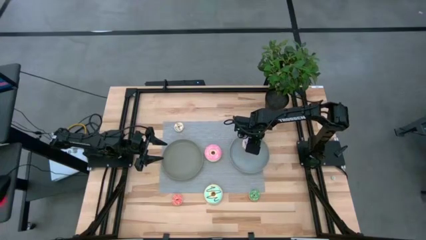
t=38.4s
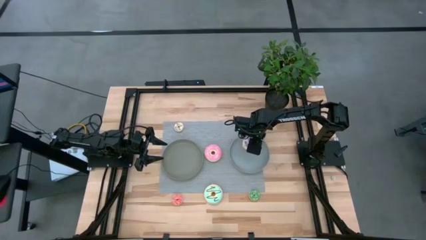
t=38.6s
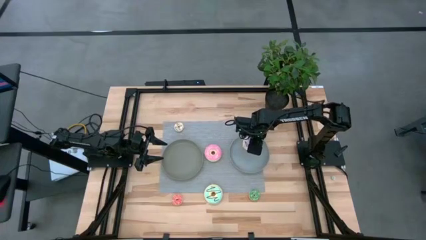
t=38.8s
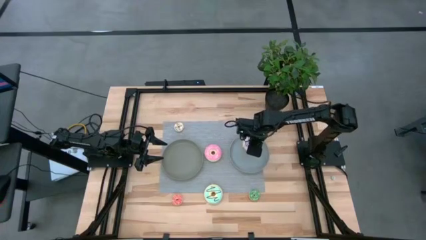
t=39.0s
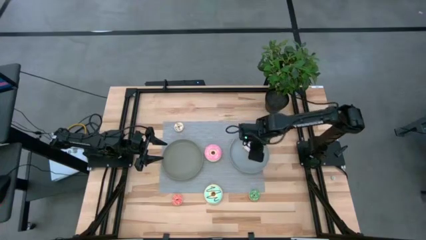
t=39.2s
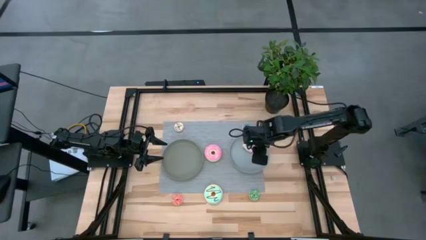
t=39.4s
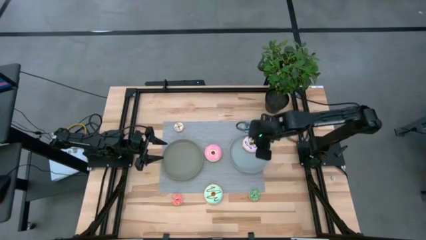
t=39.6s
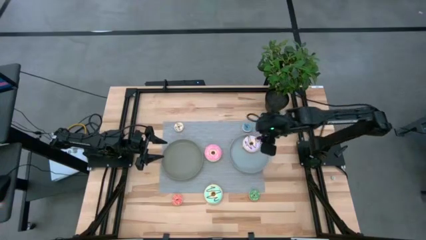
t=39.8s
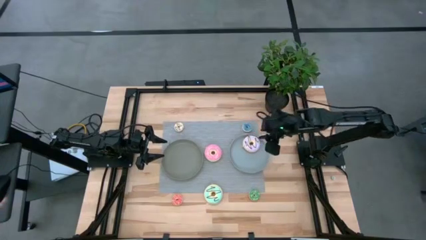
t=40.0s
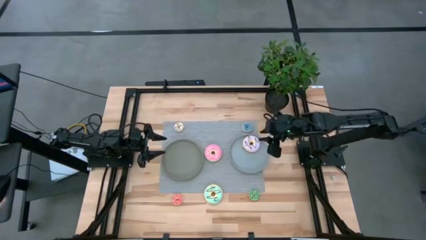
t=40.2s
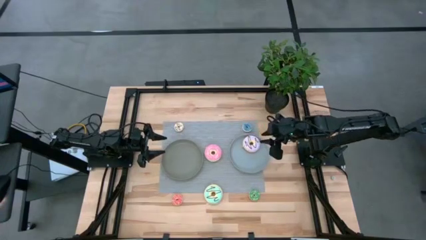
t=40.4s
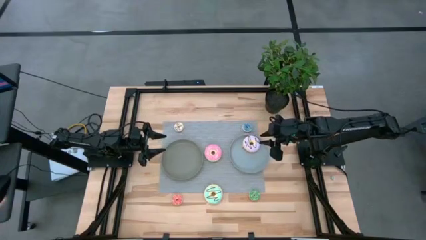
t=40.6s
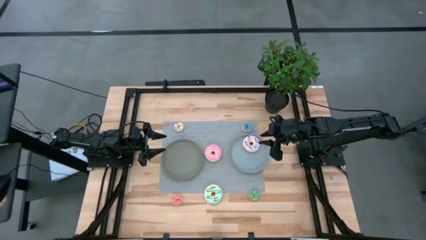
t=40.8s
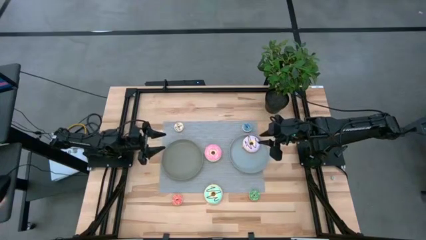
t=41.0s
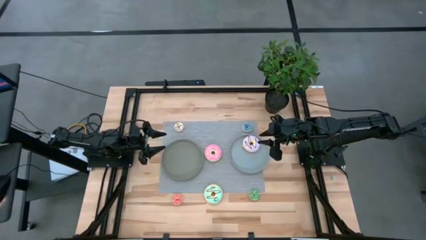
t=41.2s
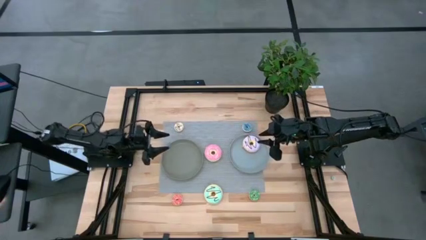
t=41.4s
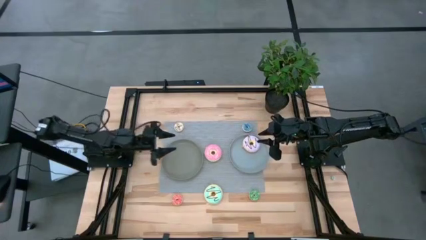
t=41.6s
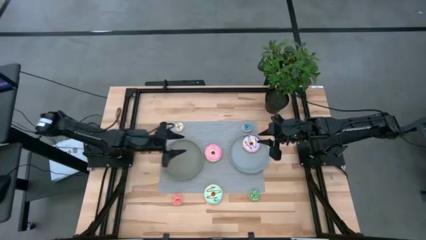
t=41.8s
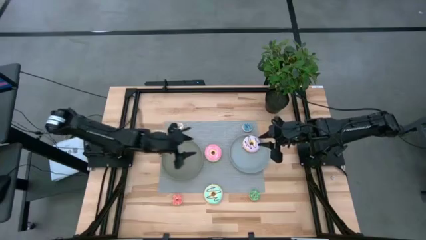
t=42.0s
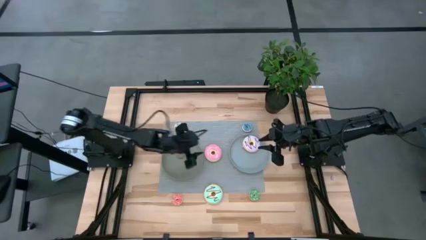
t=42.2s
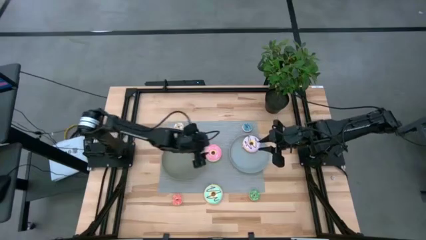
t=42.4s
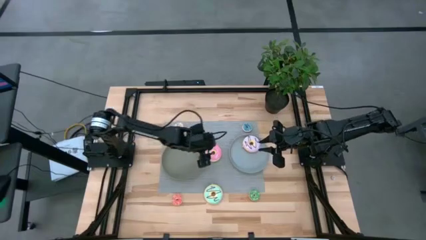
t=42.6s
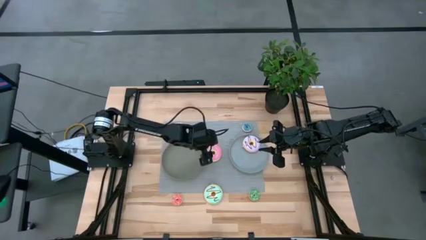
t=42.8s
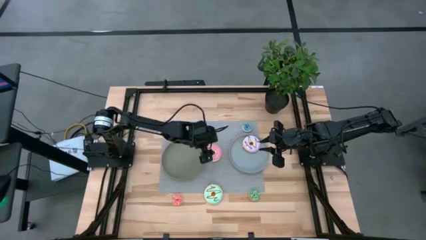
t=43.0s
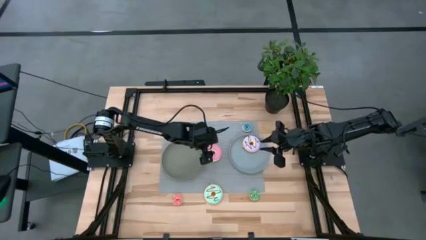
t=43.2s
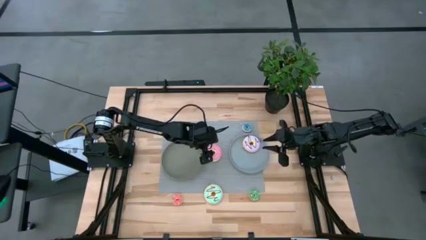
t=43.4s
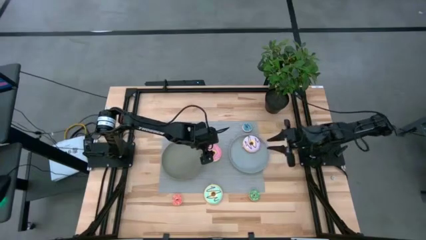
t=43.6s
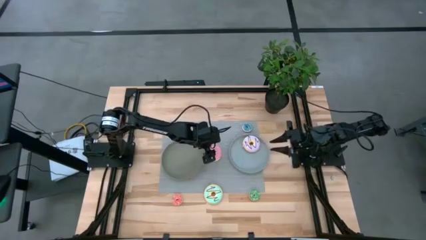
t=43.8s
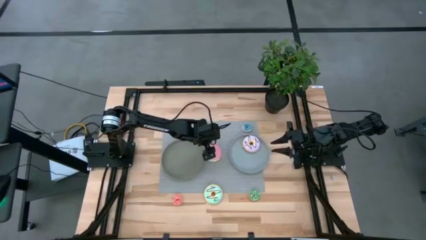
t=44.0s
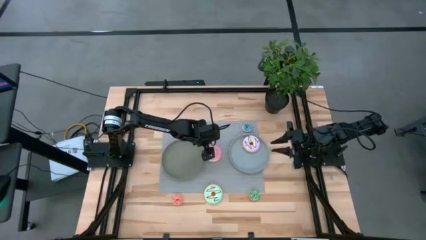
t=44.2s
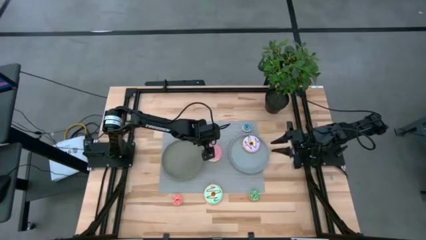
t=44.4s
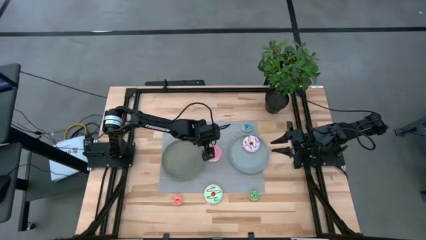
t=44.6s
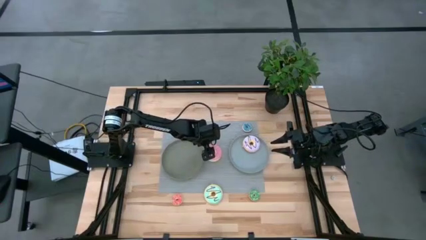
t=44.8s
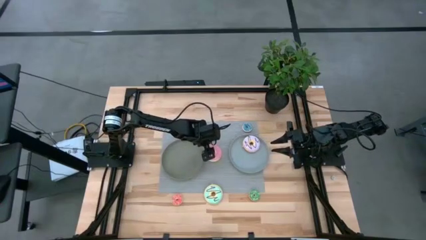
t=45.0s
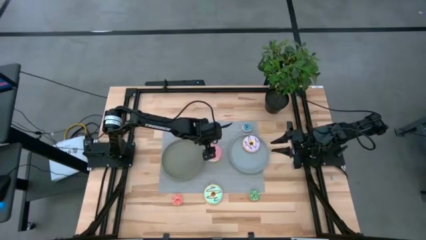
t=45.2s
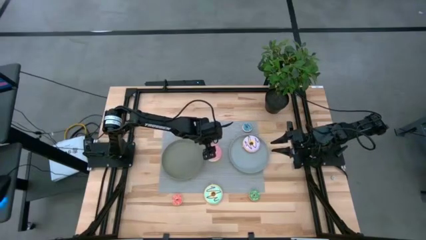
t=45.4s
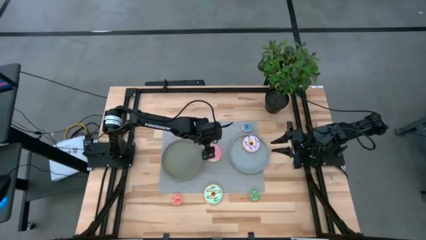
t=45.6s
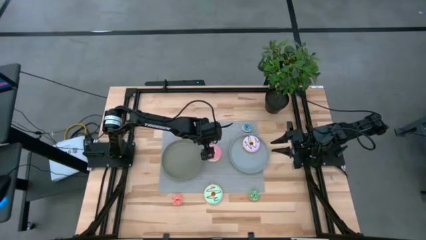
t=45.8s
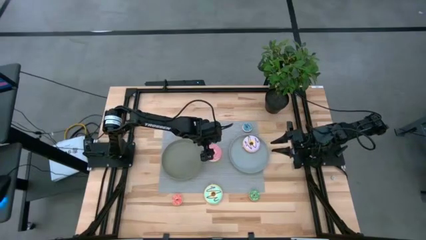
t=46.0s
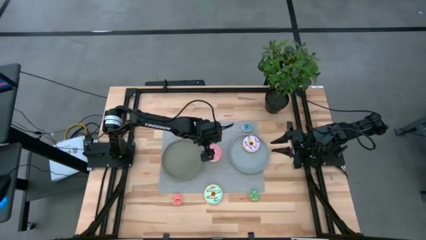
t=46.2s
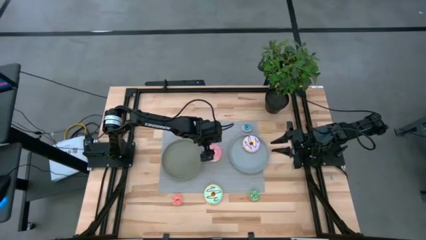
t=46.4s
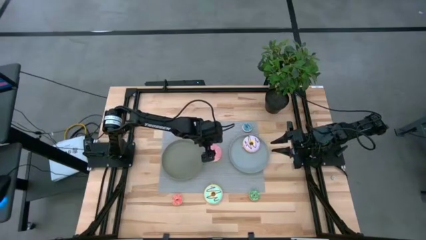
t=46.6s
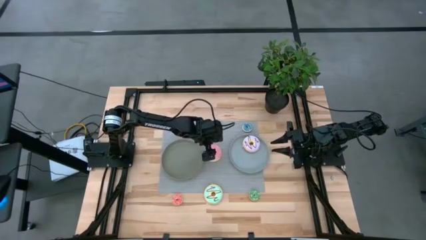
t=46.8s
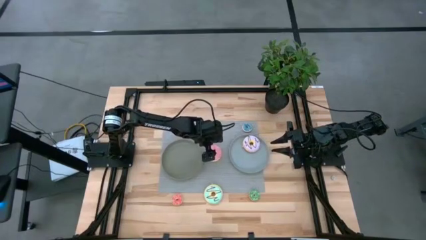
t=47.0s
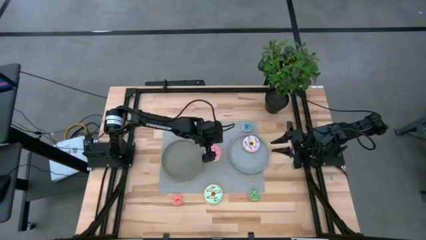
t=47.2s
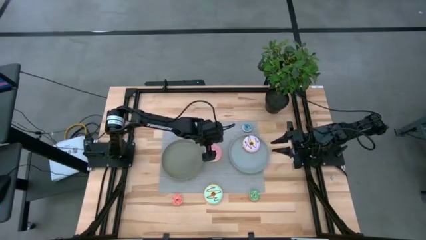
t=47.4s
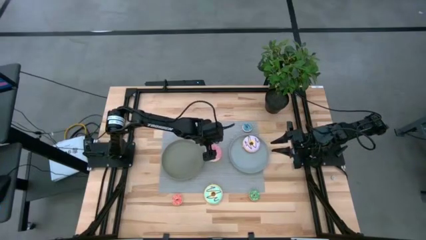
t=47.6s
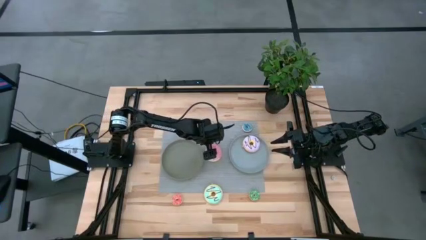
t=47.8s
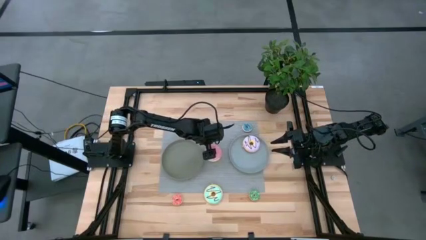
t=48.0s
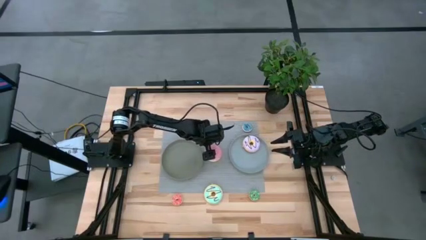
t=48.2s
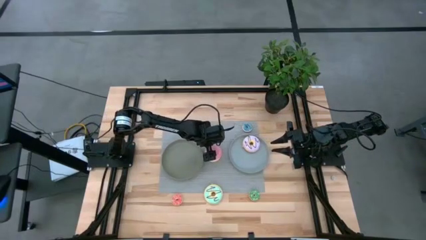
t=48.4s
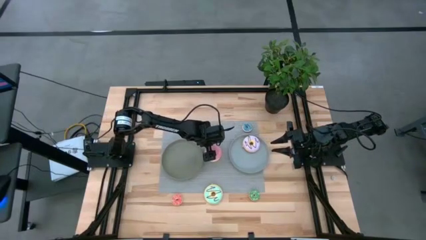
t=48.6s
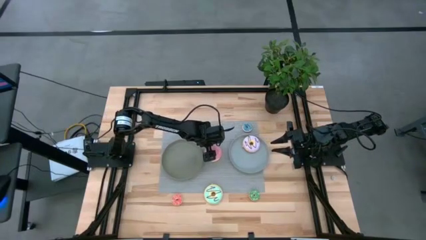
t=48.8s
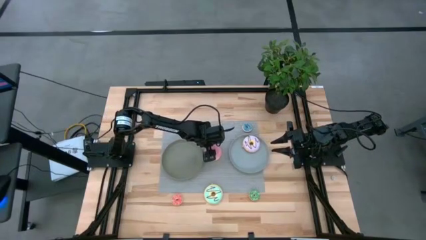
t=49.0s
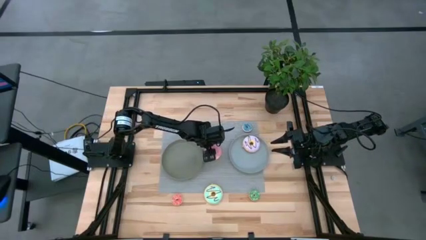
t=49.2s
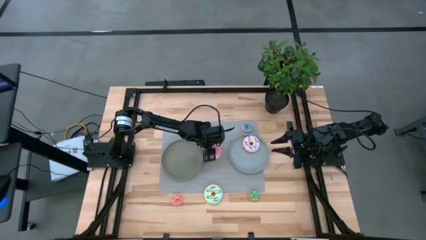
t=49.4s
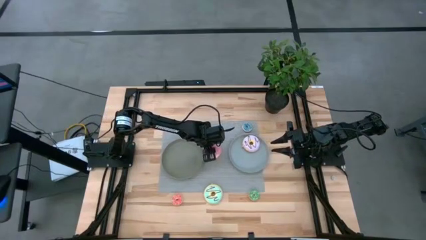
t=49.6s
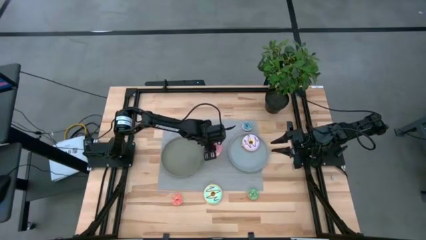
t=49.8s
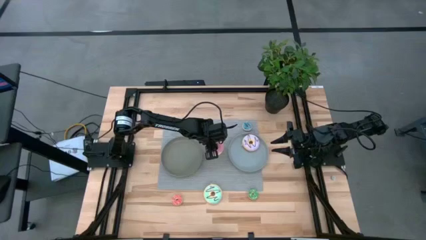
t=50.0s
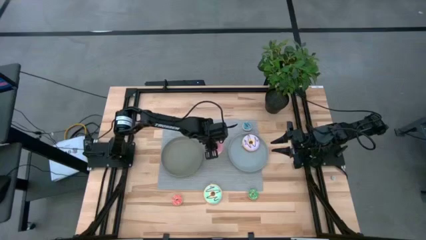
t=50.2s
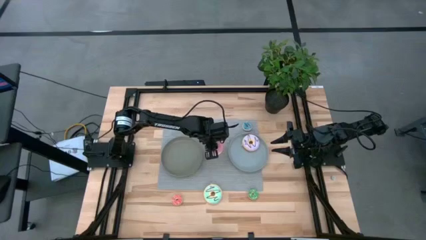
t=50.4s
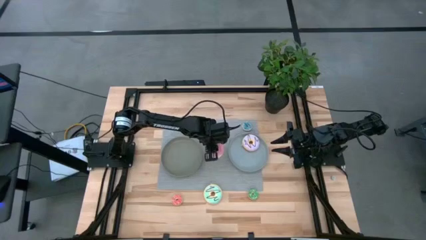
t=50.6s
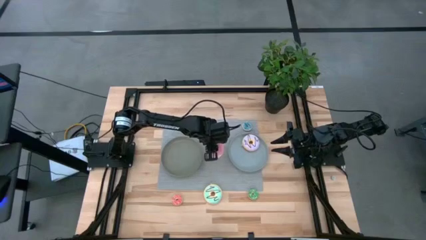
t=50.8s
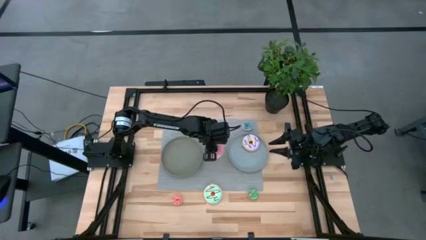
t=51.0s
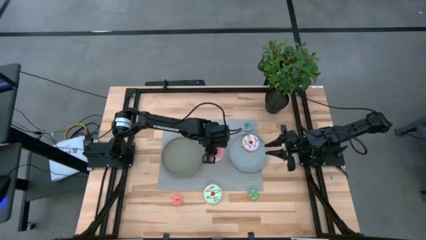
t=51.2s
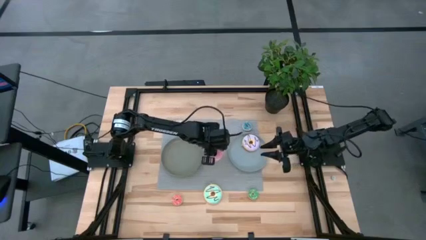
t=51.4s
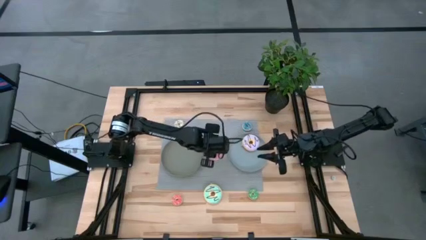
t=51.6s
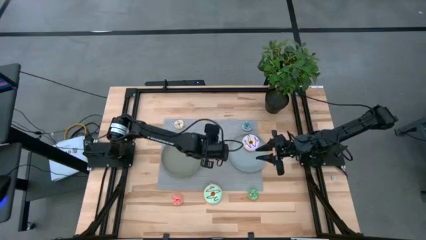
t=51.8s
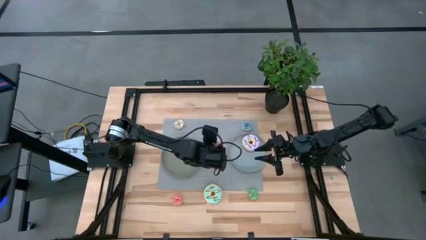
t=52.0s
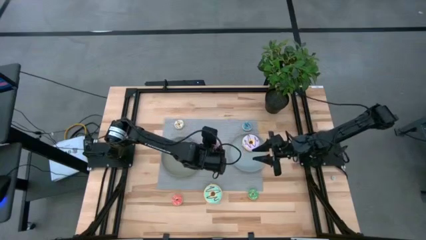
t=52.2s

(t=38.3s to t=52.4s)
Task: Pick & Place donuts
Put the big pink donut into the blue plate
